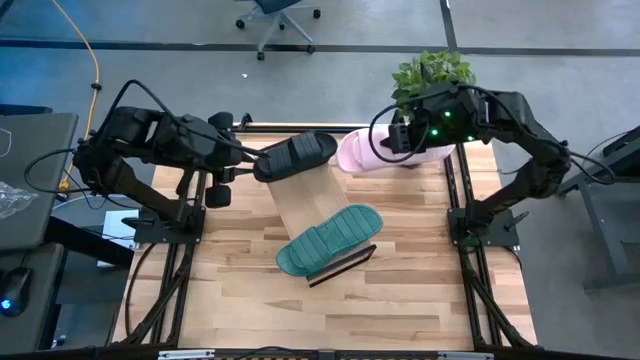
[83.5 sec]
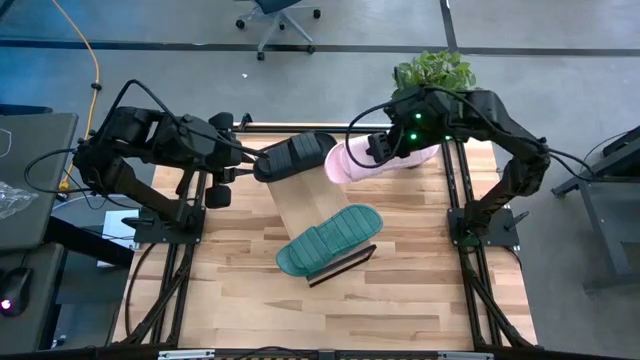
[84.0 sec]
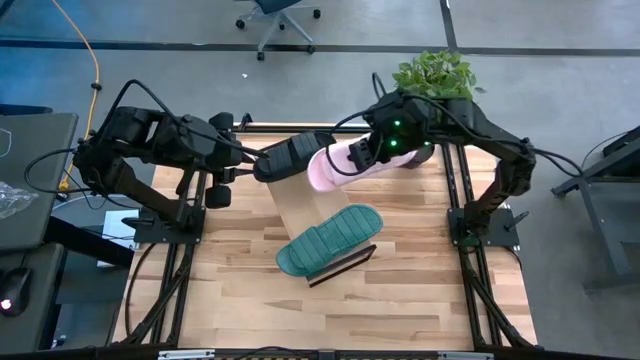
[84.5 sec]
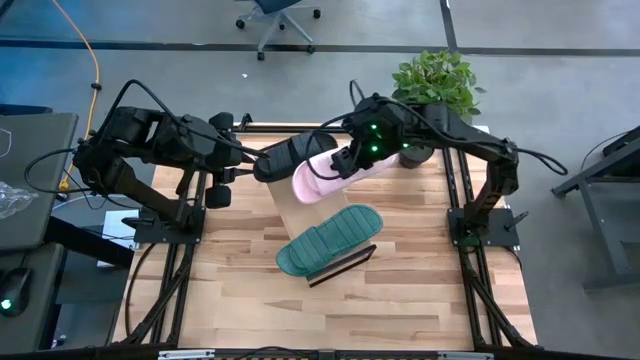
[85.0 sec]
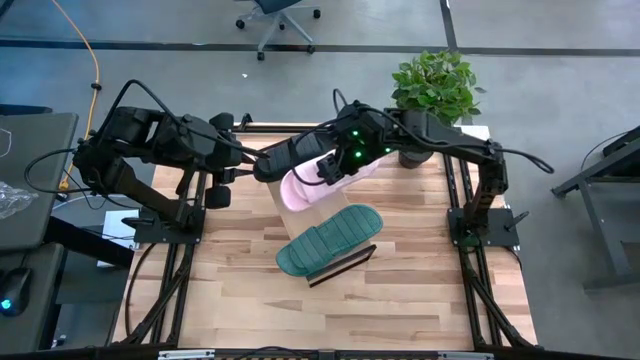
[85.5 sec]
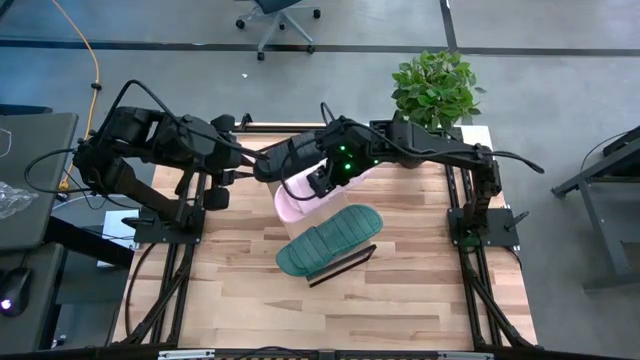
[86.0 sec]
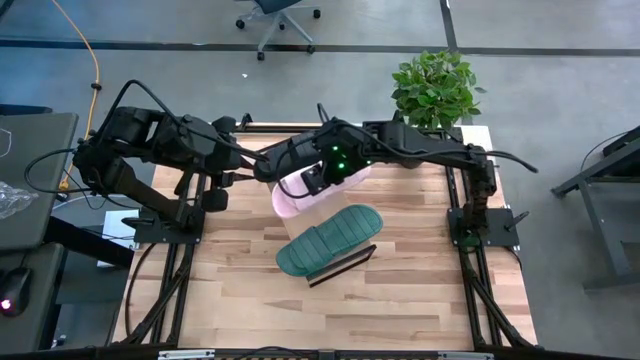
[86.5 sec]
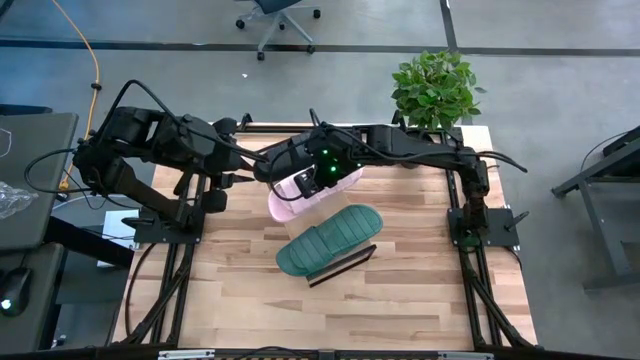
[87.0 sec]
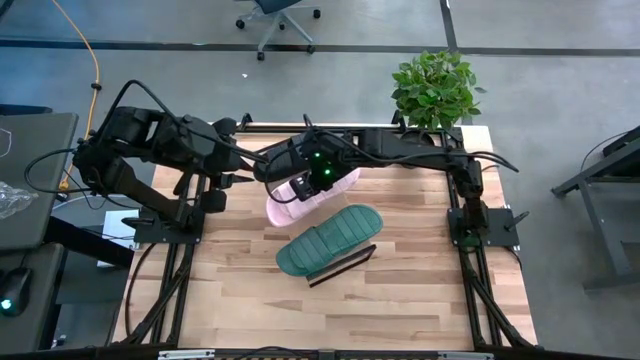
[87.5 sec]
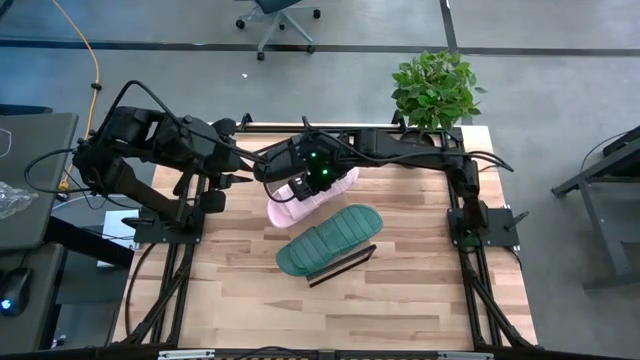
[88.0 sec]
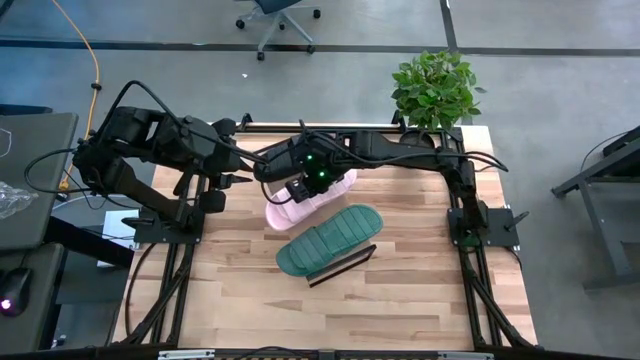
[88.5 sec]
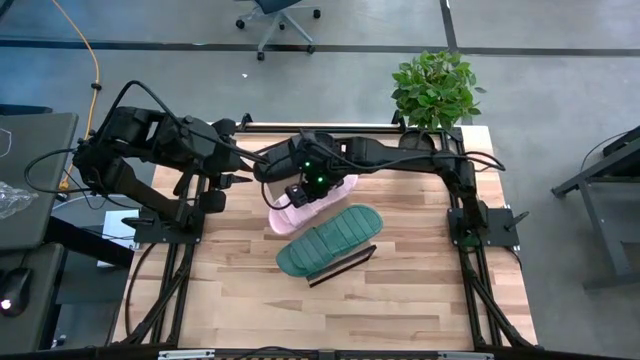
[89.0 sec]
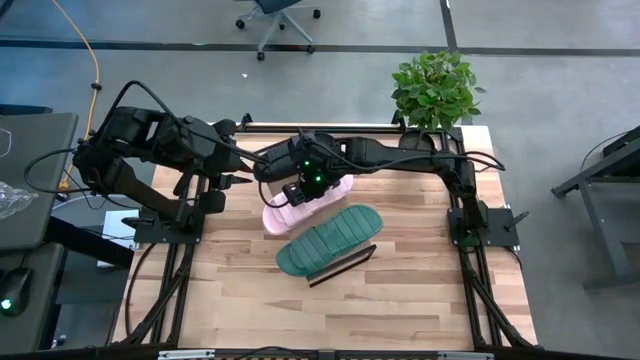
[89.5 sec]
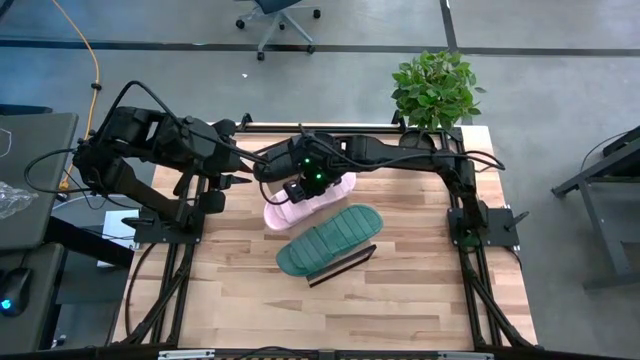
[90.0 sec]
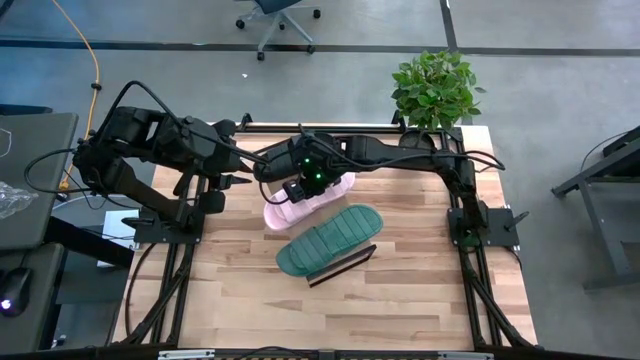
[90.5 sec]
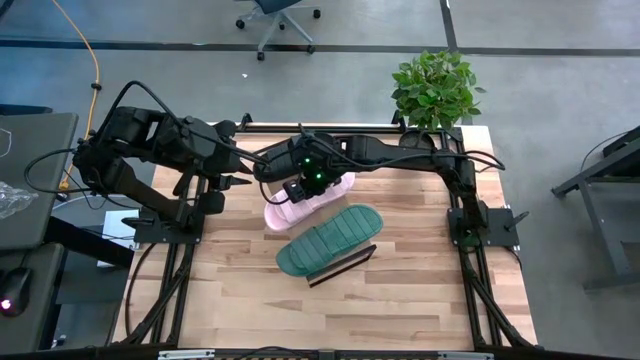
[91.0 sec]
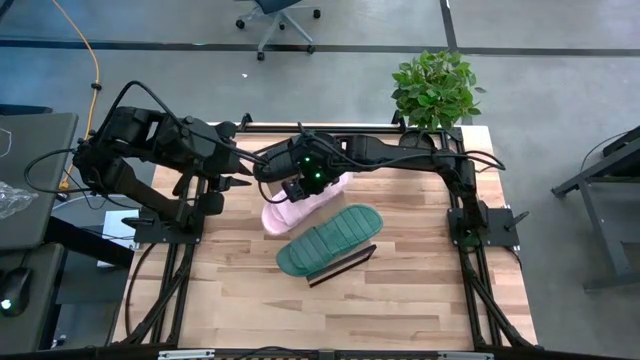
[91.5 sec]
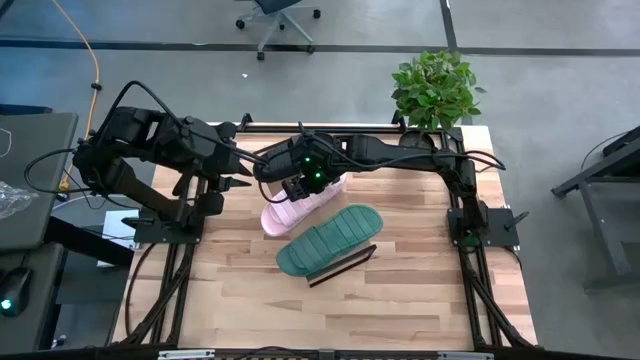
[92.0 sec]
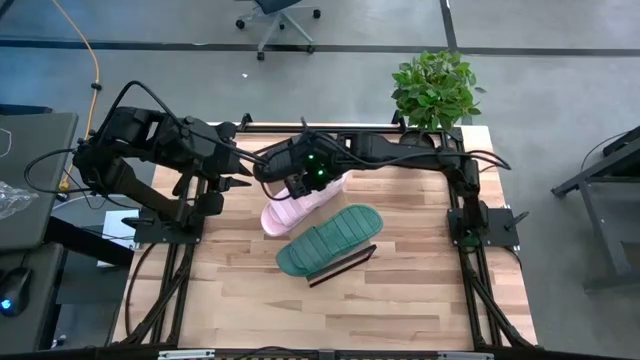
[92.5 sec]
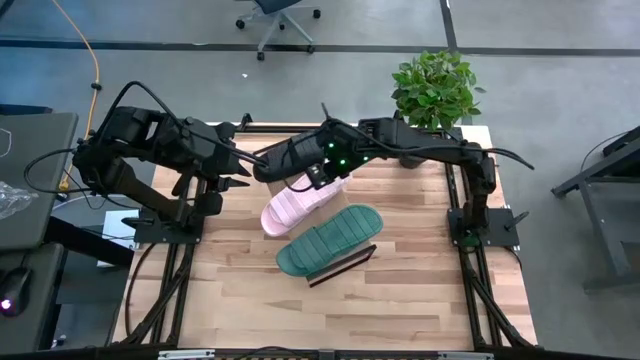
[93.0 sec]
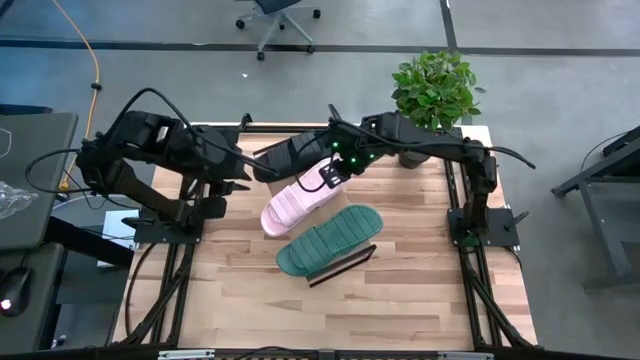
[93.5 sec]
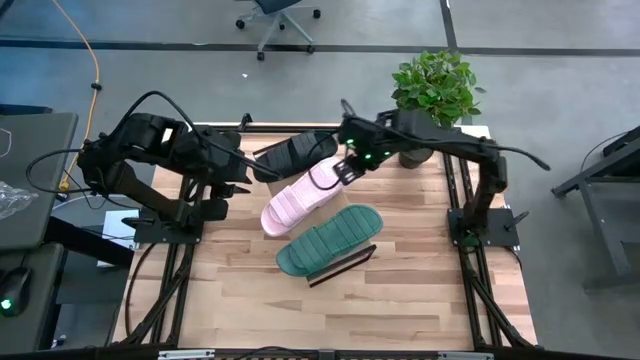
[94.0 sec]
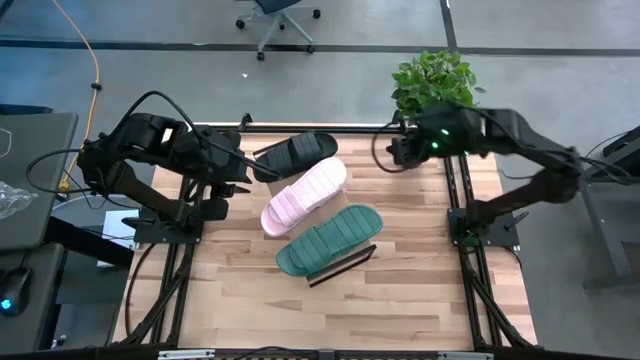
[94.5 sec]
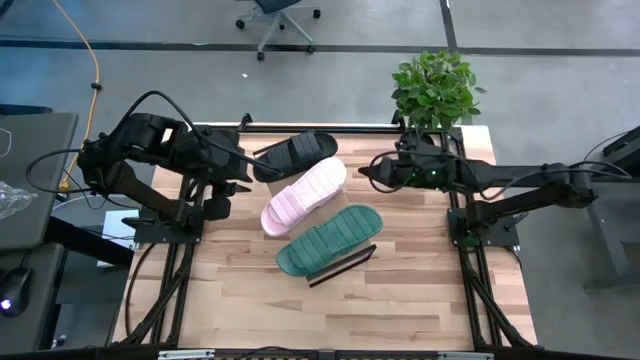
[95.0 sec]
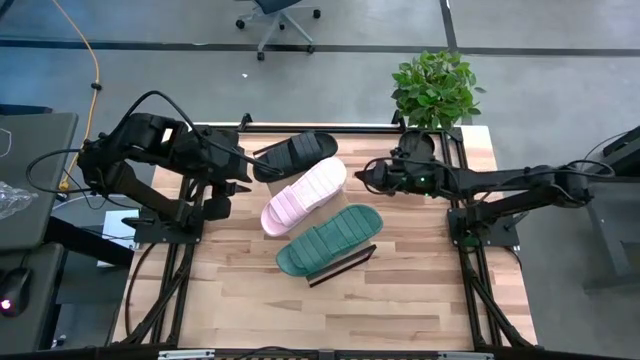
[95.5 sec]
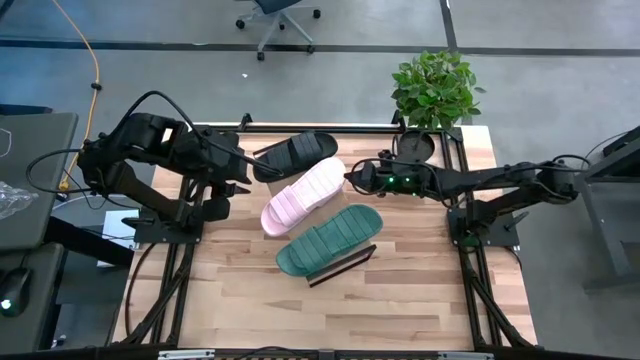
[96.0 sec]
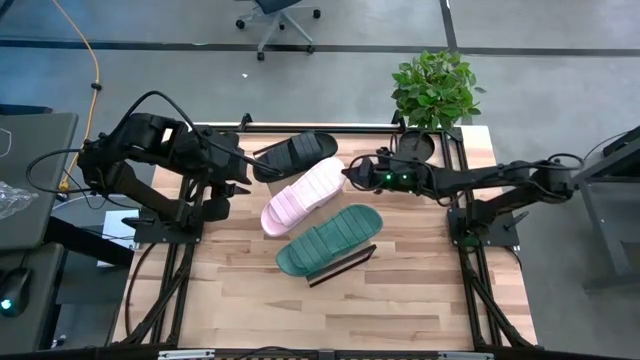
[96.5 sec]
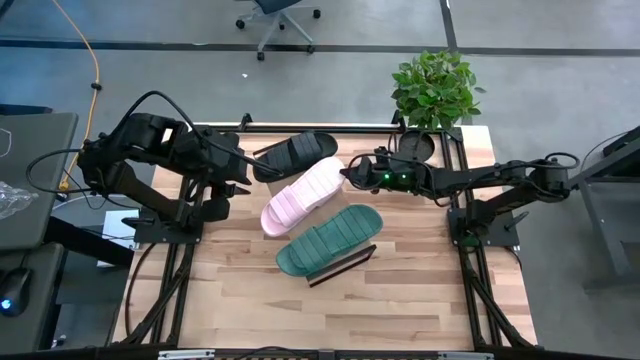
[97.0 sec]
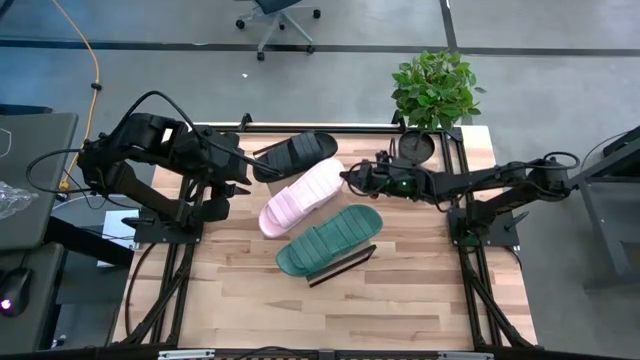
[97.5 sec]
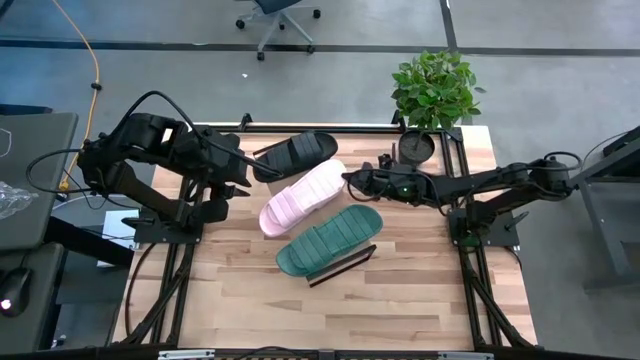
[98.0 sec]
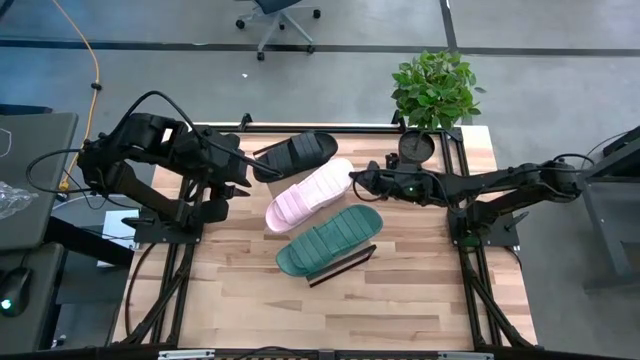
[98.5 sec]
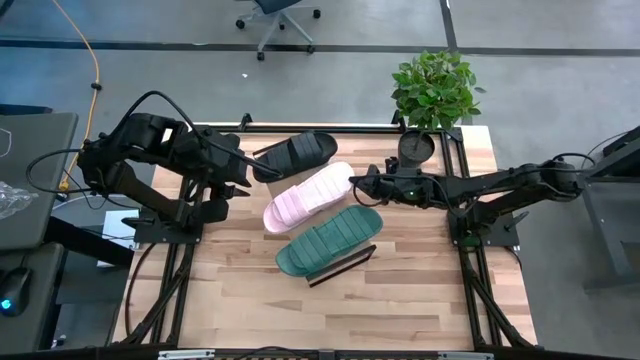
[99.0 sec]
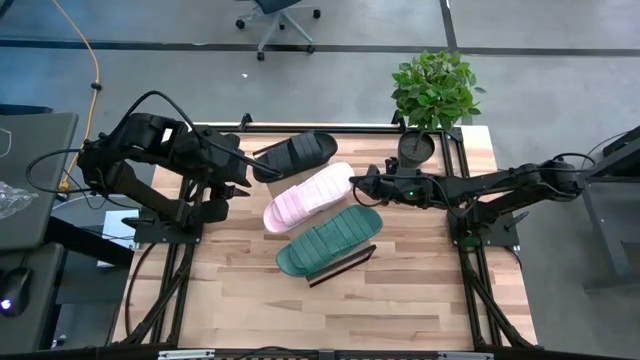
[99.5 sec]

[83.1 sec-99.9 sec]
Task: Pick and place slides into the shelf
Put the pink pair of slides on the shelf

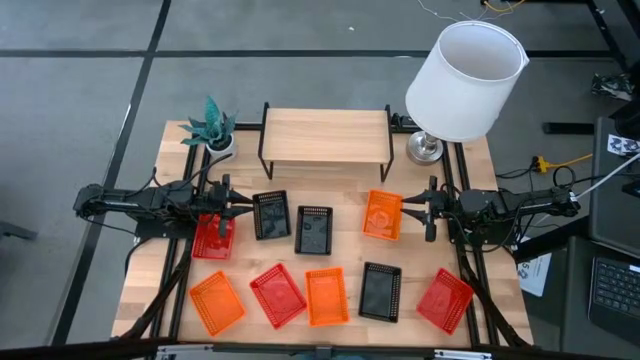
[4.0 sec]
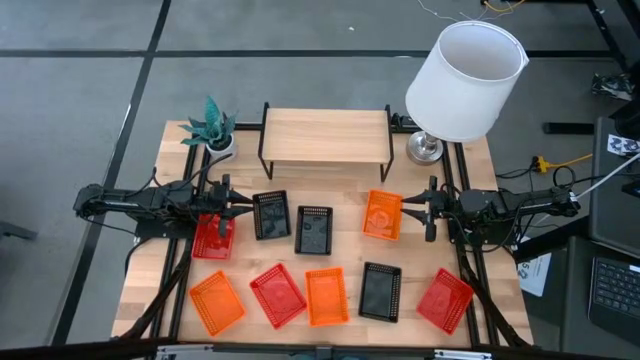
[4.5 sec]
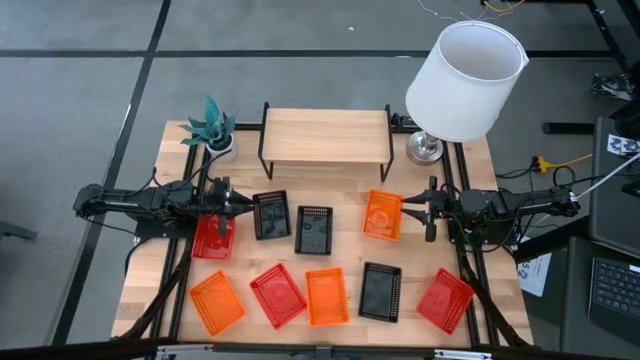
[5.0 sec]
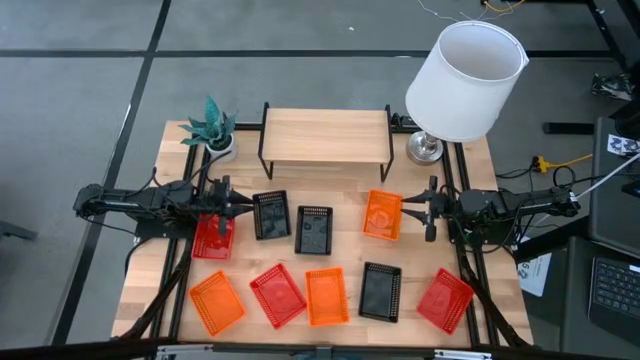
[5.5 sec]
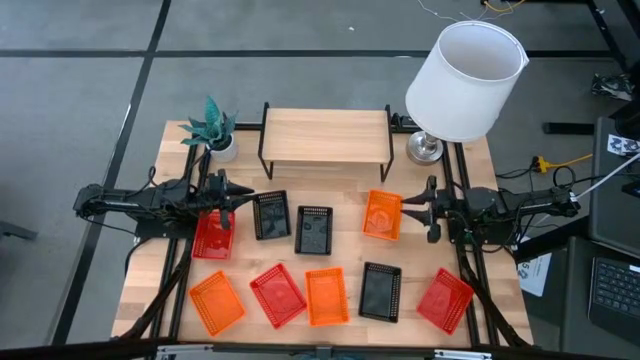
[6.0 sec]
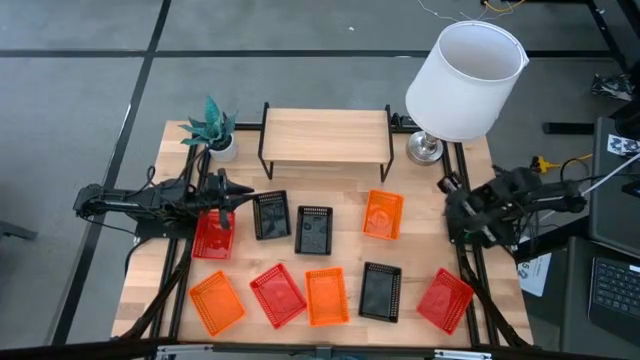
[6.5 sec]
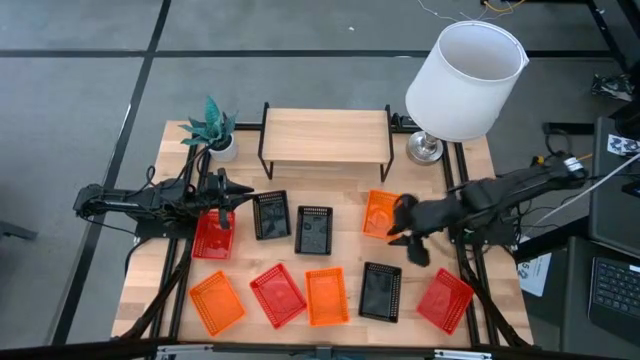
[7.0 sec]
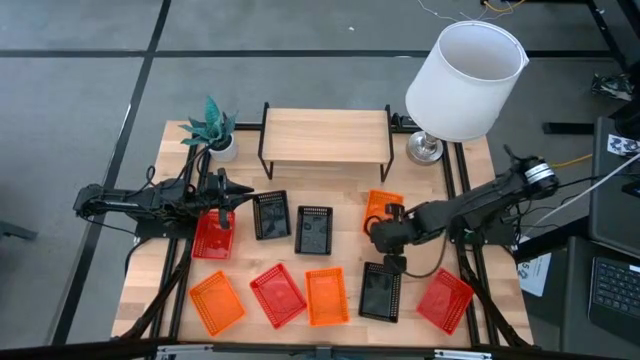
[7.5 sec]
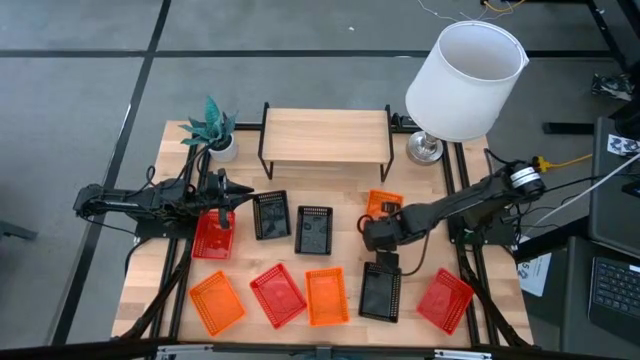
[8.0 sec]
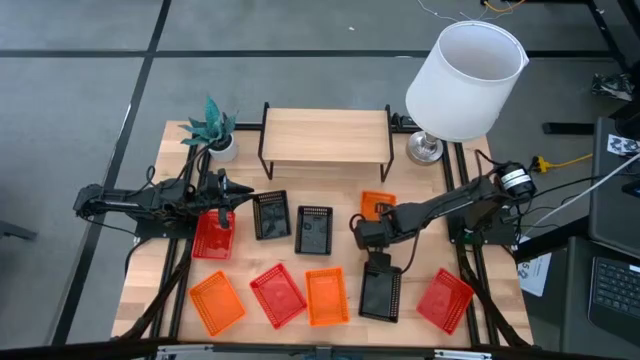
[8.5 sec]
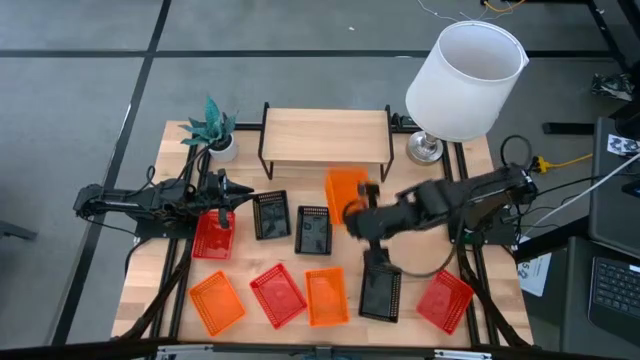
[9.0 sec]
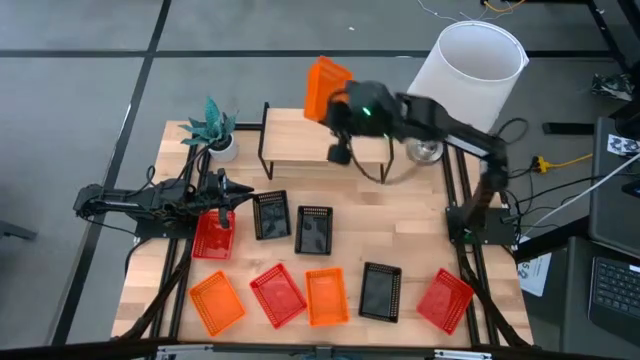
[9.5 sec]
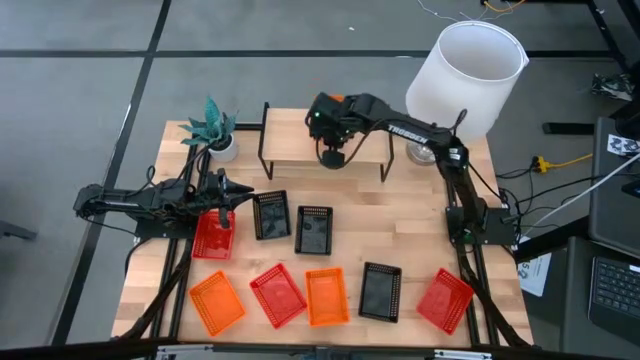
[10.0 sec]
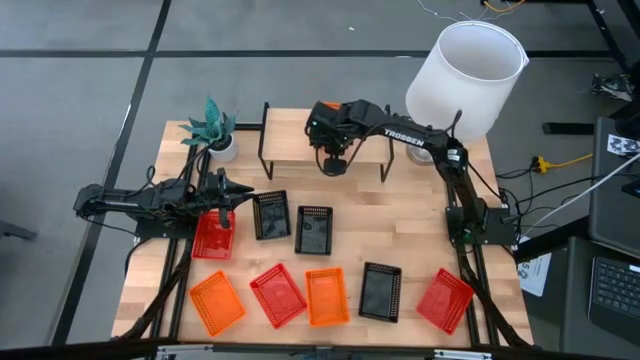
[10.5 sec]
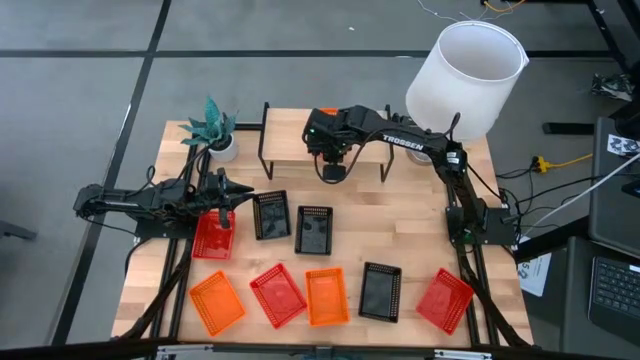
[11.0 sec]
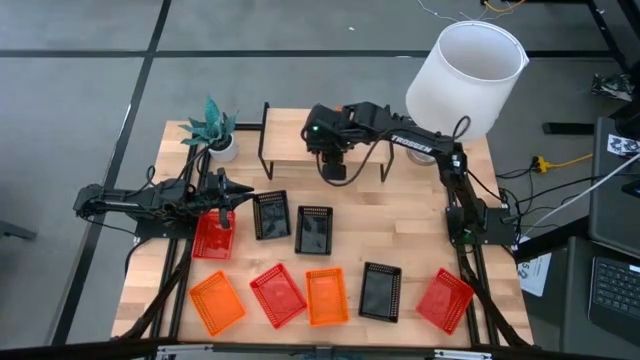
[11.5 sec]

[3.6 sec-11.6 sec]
Task: Stack baskets on shelf by color
Put the top right orange bin on the shelf
